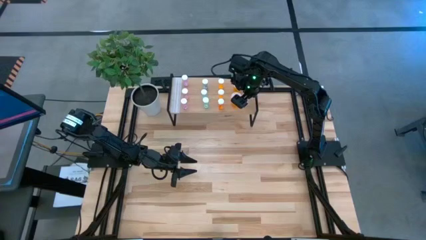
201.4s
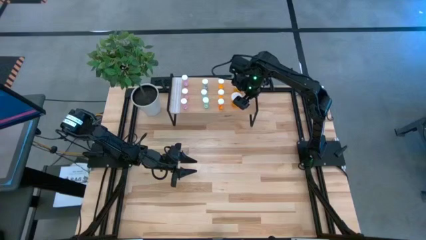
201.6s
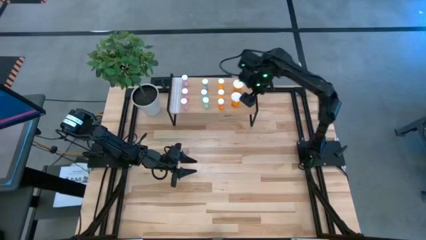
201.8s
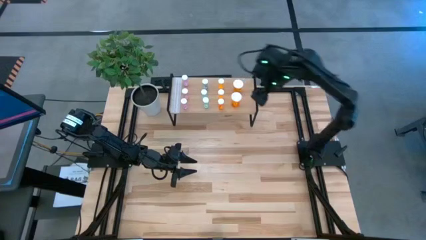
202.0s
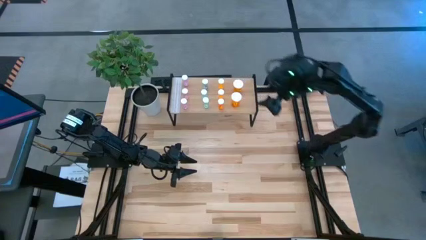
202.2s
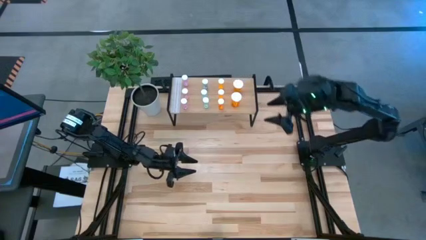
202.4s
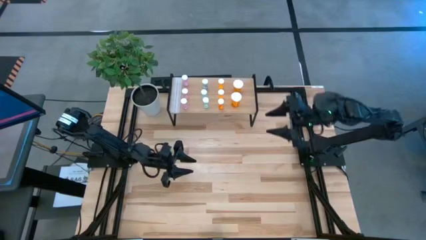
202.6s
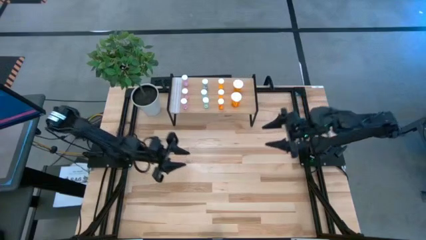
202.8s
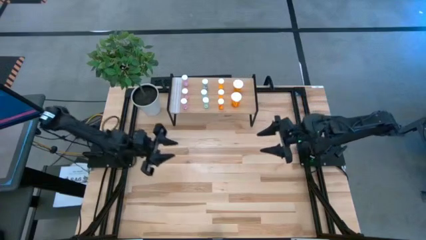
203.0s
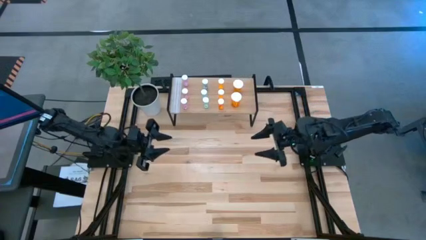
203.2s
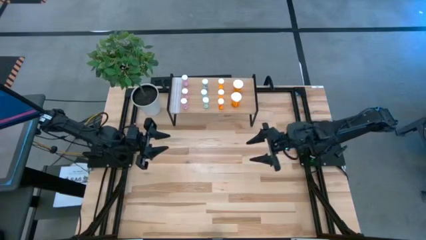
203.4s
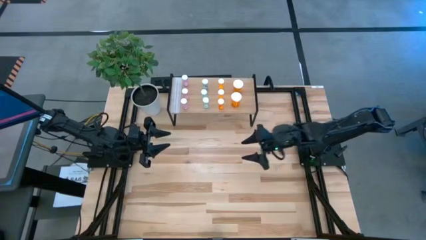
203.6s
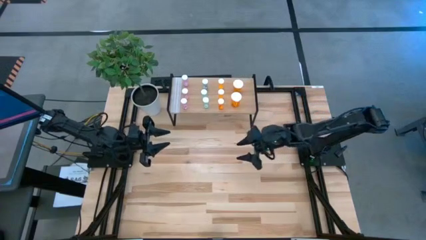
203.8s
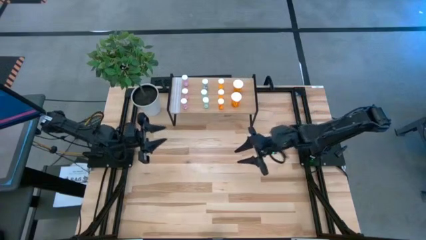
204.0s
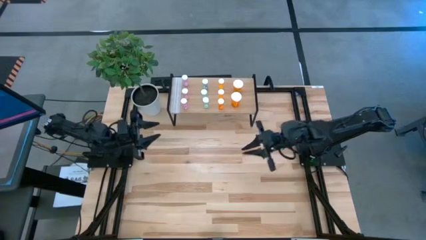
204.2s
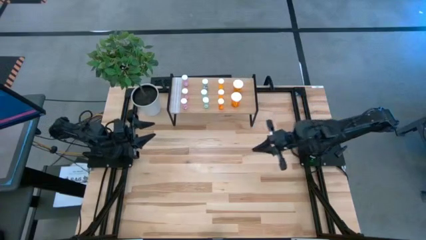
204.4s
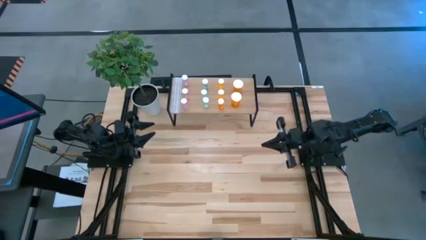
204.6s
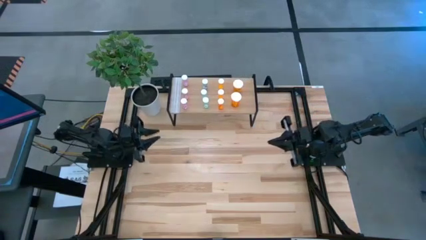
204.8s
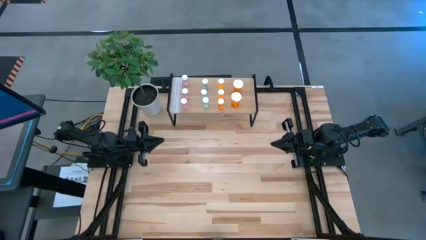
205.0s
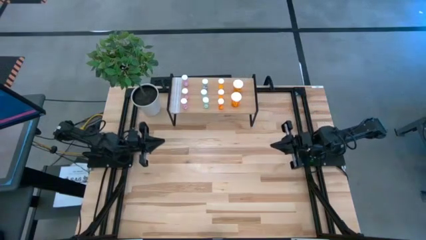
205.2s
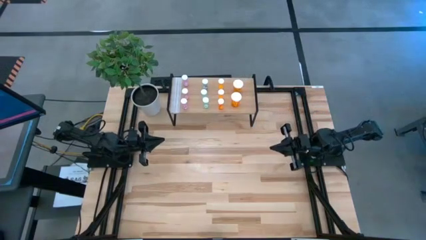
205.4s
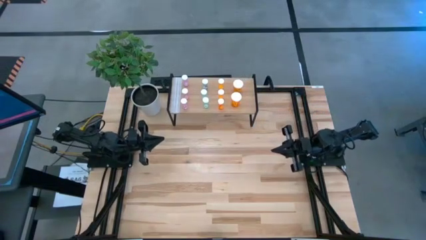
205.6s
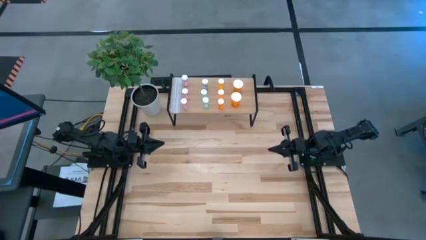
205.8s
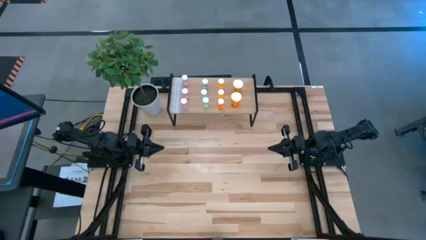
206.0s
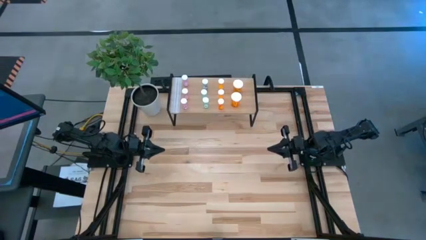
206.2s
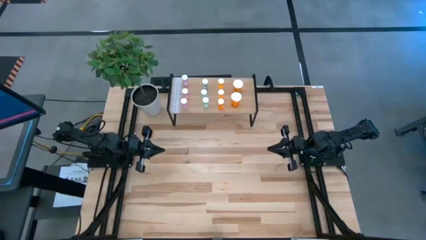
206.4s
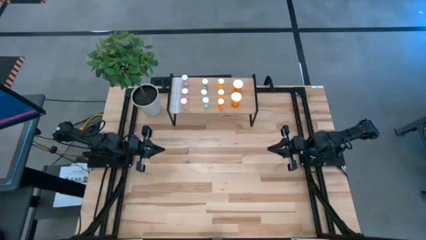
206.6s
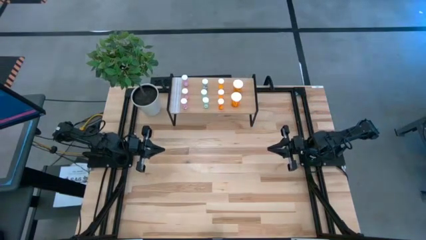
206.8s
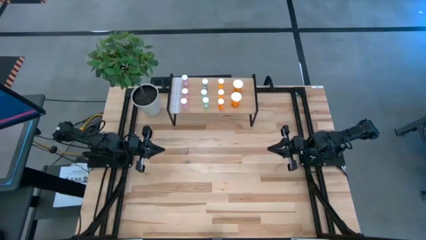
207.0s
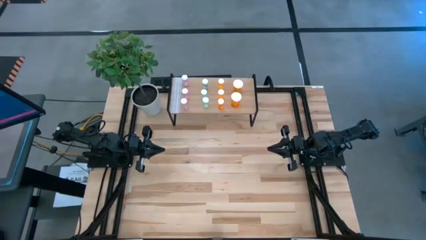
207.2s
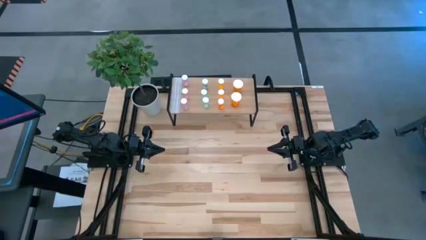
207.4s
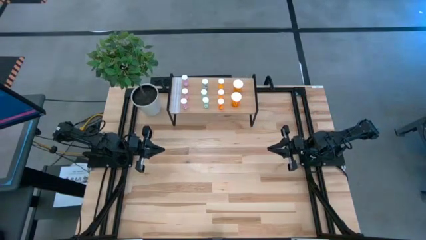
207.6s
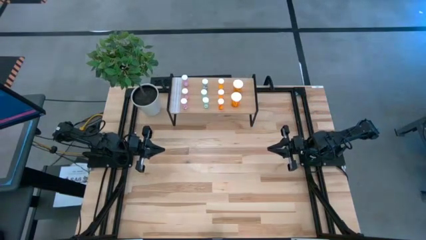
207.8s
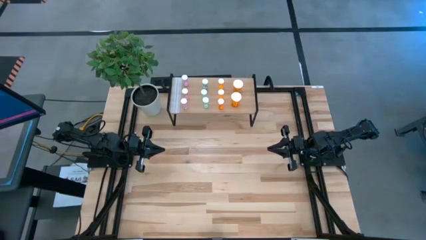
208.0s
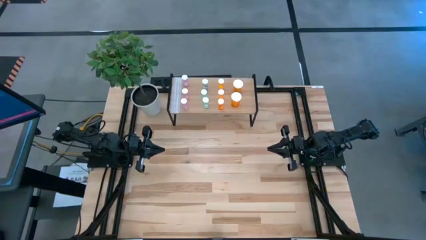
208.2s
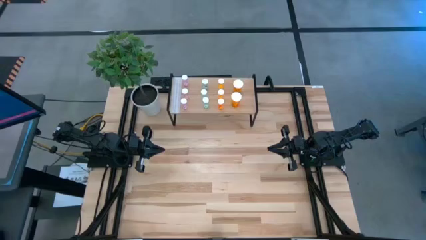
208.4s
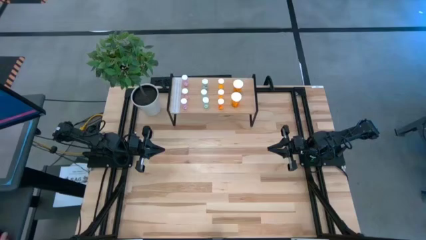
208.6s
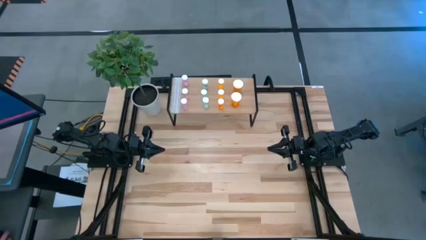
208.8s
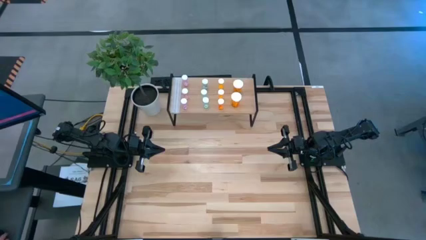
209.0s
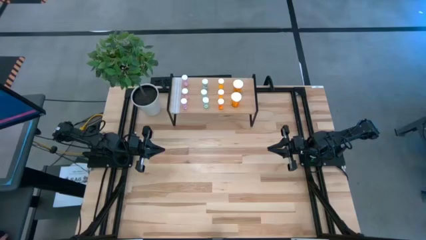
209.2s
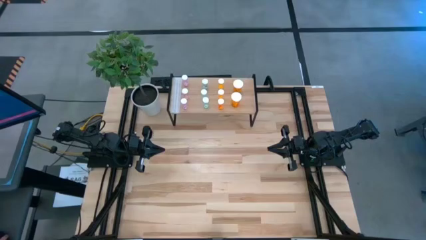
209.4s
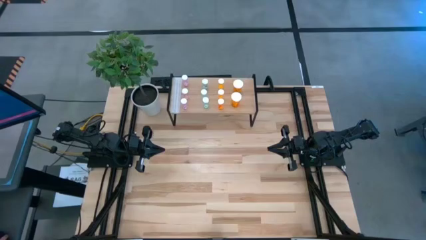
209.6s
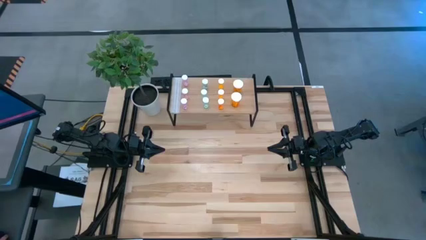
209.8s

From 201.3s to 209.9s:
Task: Pick and place medicine bottles onto shelf by color
Return to Home Position
